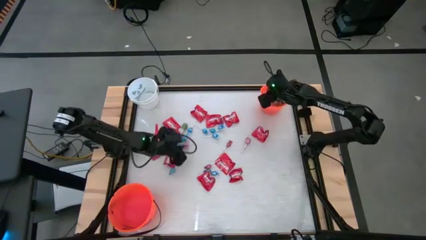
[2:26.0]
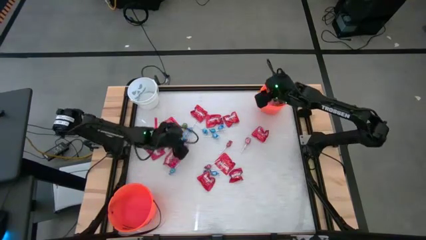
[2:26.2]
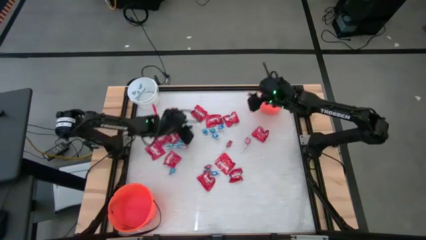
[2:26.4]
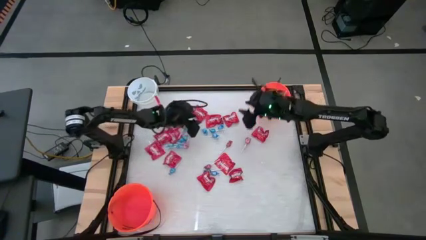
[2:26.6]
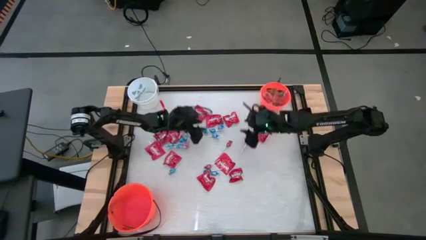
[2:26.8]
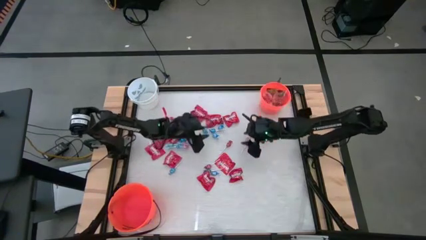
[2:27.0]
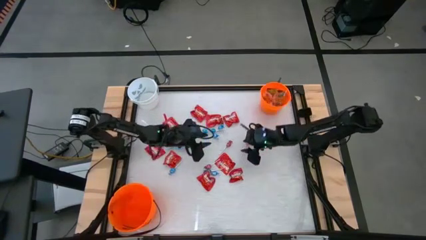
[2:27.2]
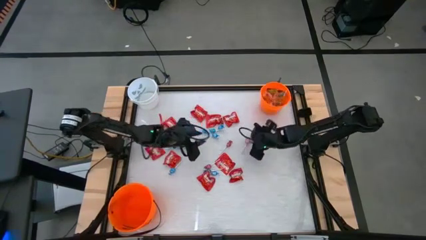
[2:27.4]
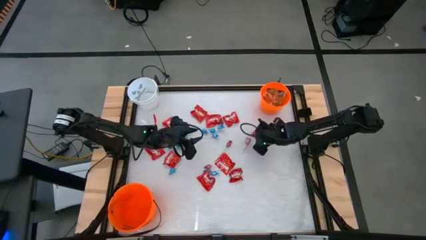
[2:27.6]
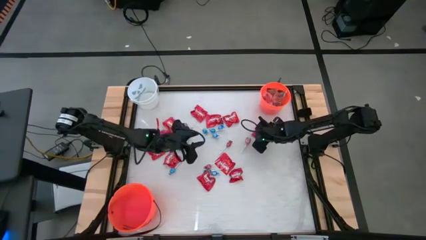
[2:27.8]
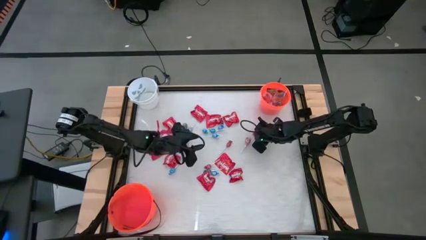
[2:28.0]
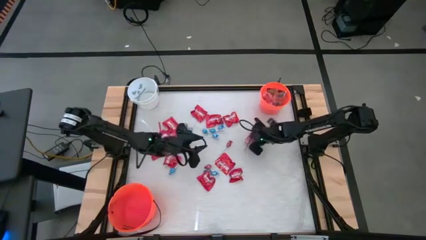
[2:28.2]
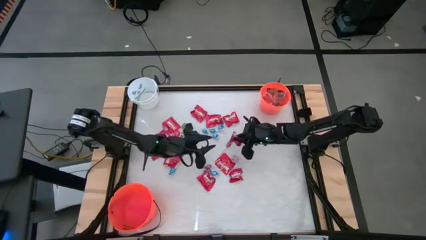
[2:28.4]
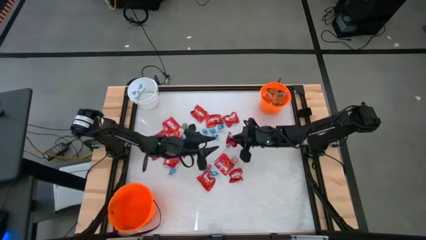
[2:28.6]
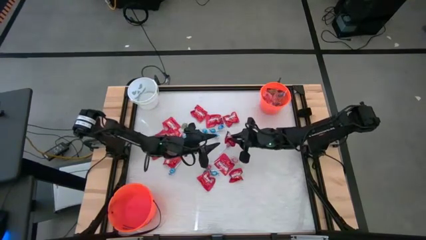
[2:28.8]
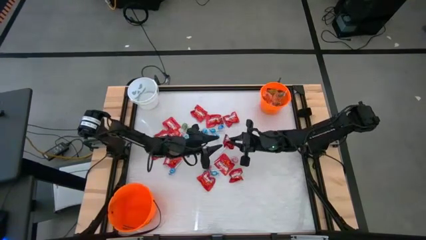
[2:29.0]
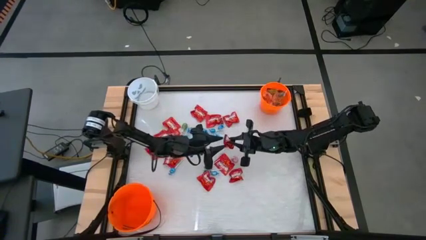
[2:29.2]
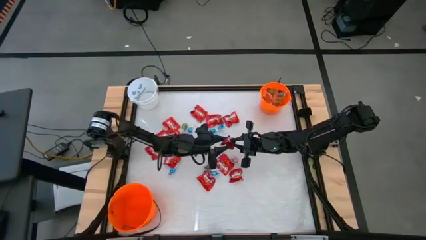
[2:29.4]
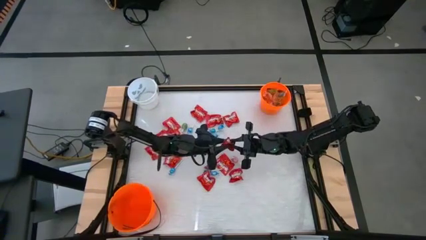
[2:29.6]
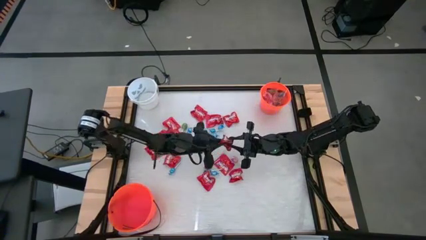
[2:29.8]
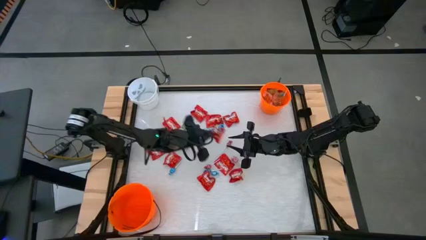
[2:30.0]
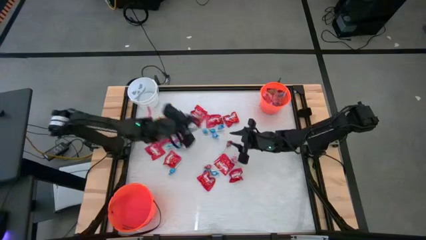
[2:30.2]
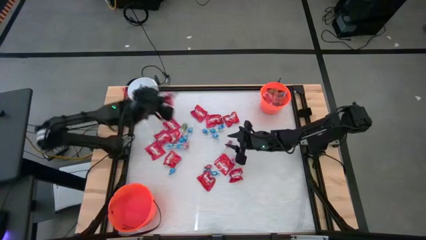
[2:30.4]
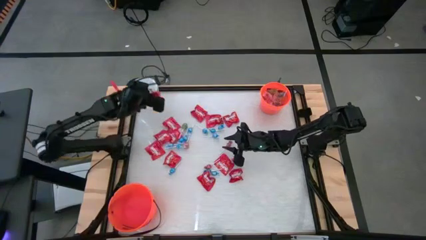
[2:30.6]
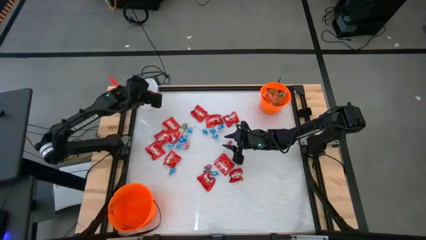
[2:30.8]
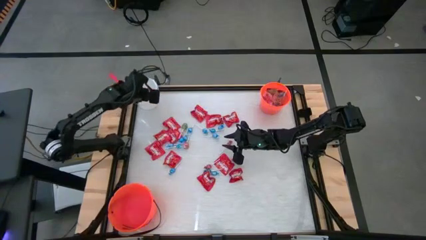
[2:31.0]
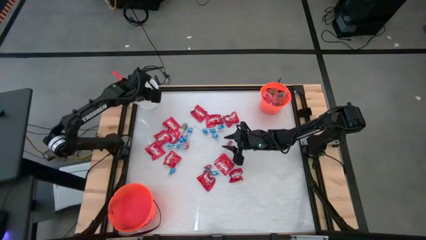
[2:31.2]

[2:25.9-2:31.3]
Task: Sort candy by brand, put in halloween buckets
Put the red candy pack into the white bucket

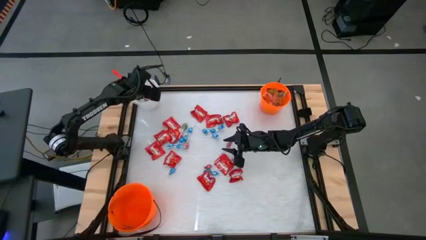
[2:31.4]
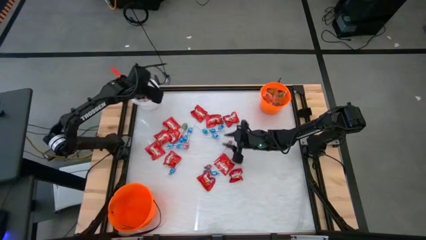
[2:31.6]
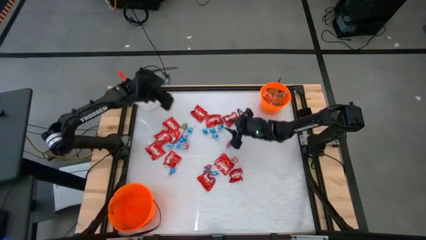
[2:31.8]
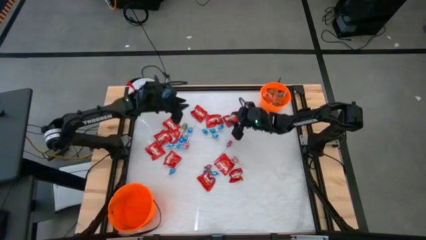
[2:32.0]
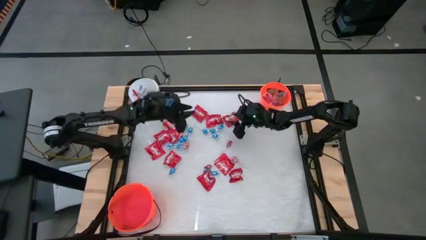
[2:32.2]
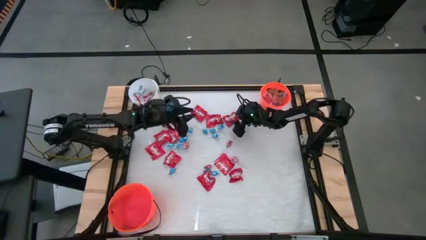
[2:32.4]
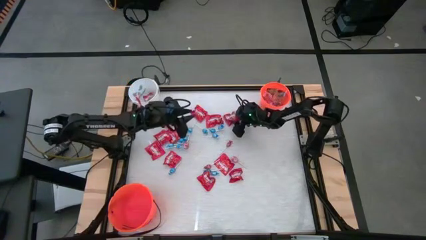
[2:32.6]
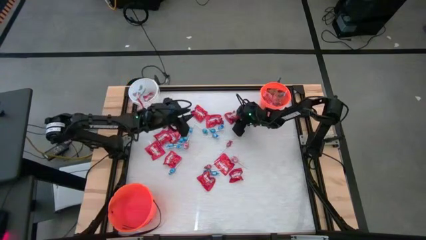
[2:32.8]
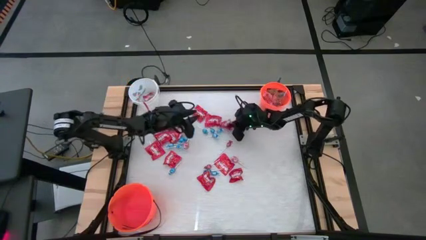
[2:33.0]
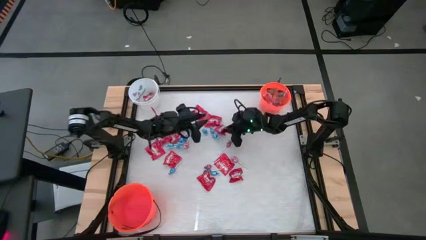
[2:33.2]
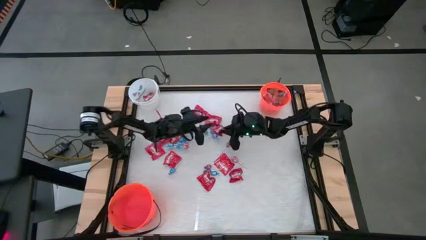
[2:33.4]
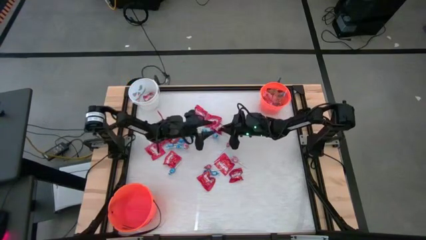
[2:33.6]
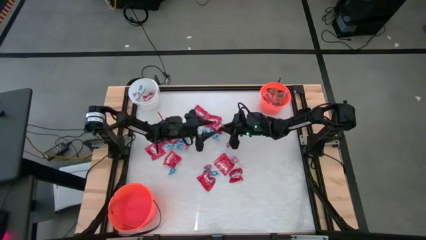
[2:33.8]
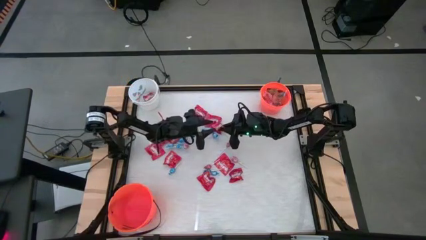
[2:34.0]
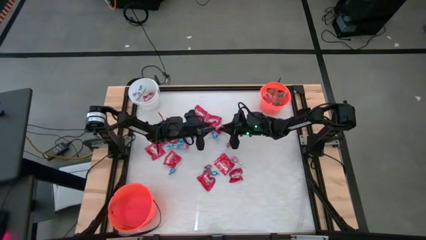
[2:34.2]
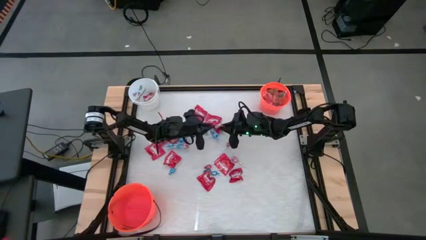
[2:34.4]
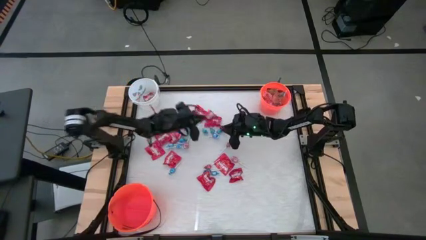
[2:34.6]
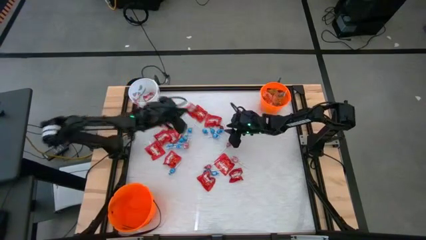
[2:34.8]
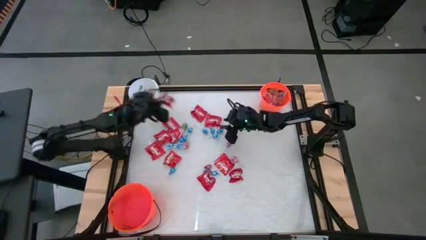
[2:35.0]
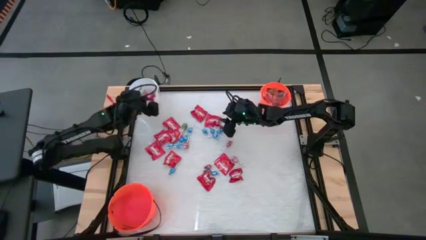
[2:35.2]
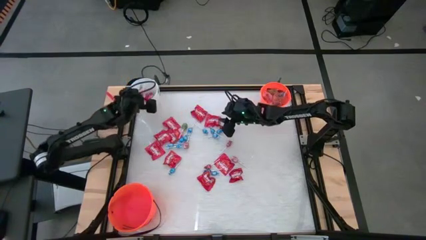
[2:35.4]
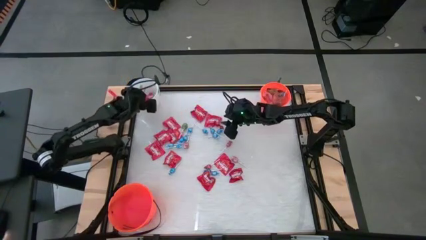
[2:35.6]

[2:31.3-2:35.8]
Put the red candy pack into the white bucket

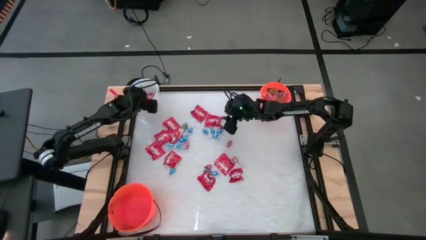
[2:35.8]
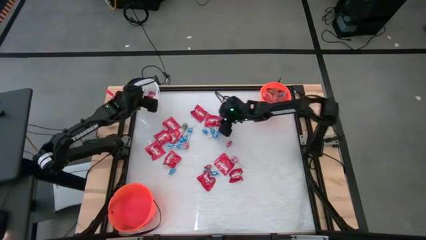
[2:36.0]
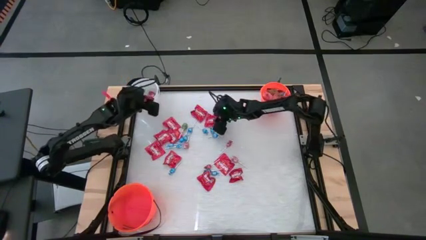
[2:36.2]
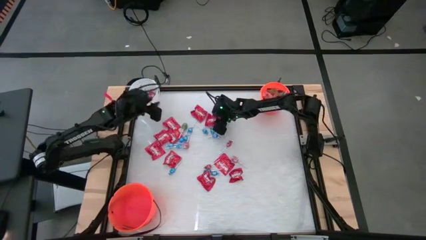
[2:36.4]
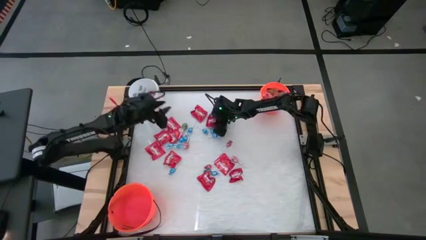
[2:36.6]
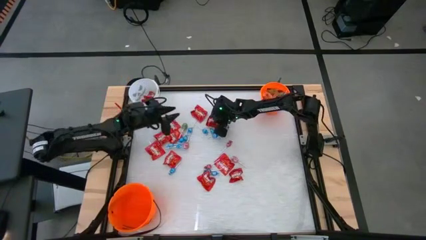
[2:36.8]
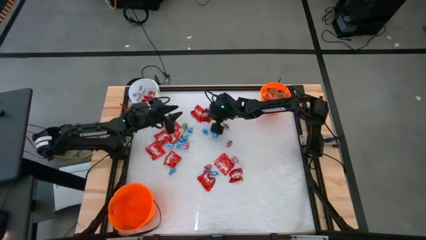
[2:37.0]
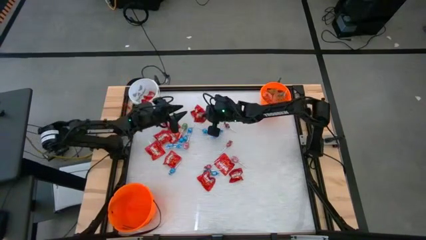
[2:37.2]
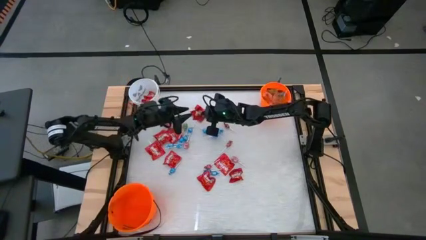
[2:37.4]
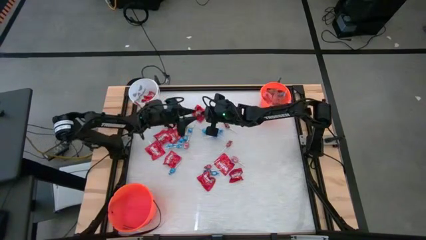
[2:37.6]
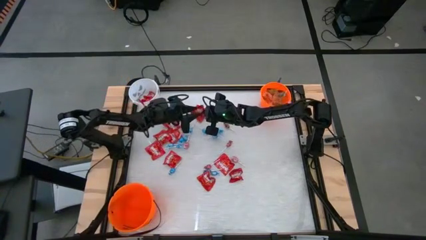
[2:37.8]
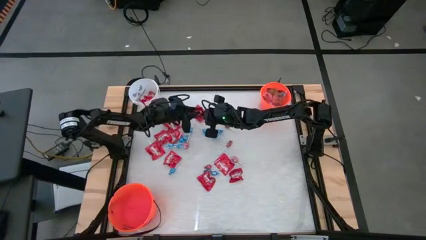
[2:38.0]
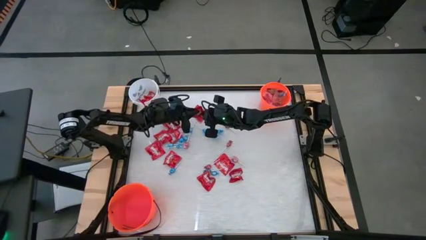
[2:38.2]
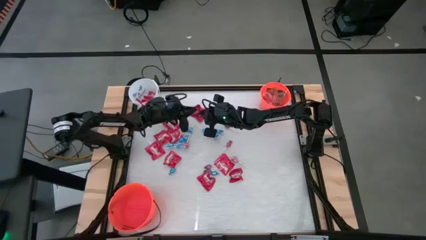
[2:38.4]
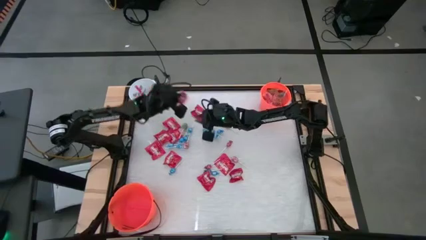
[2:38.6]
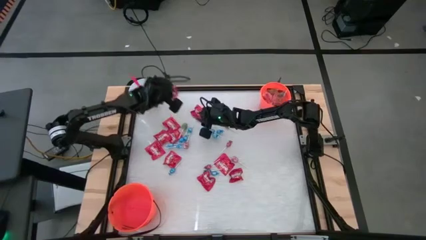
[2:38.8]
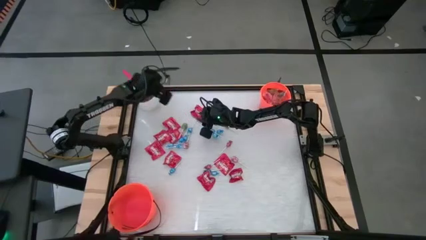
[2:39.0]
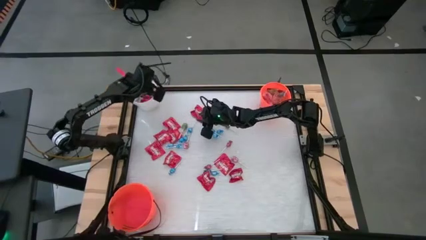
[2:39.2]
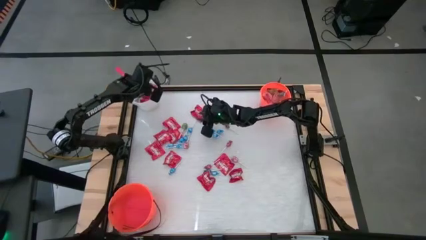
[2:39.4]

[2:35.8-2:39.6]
Put the red candy pack into the white bucket

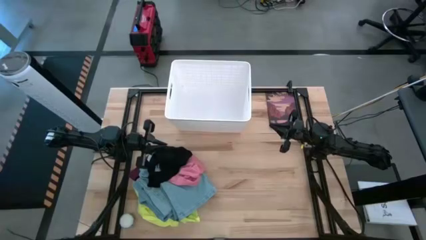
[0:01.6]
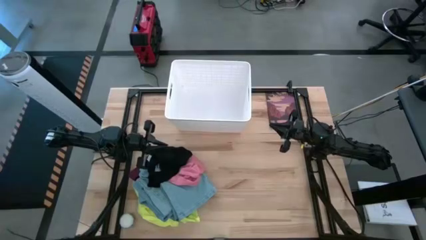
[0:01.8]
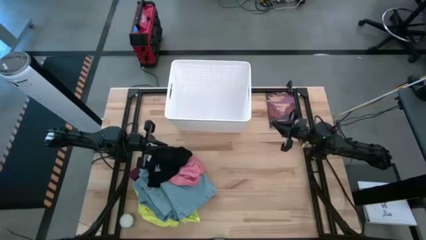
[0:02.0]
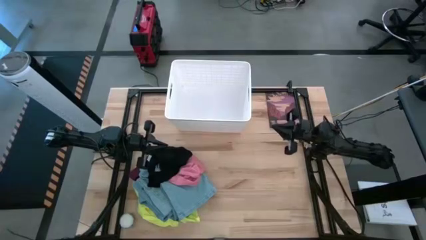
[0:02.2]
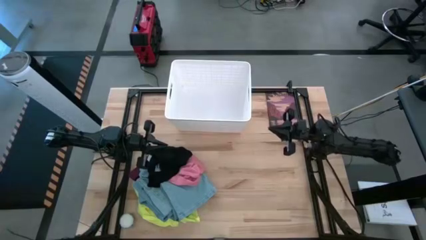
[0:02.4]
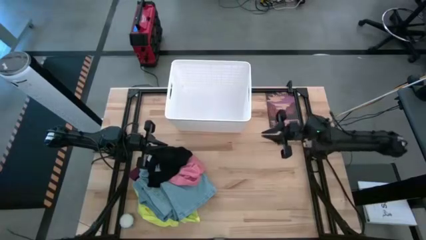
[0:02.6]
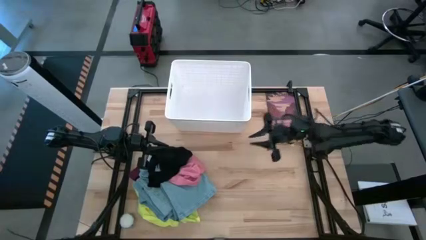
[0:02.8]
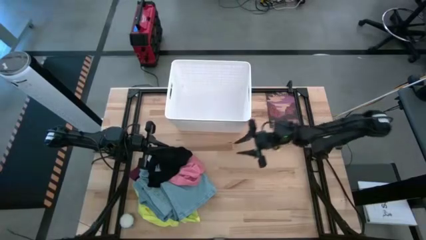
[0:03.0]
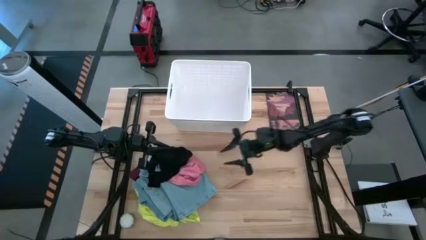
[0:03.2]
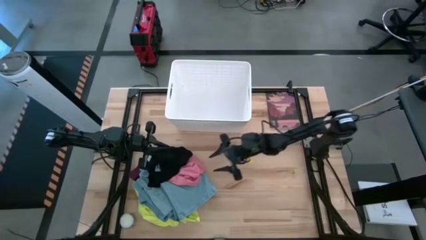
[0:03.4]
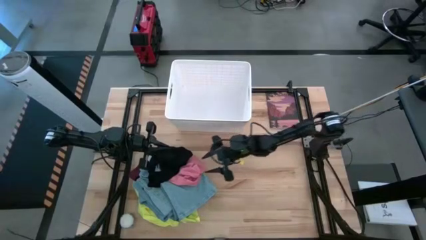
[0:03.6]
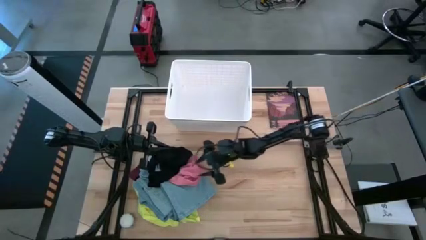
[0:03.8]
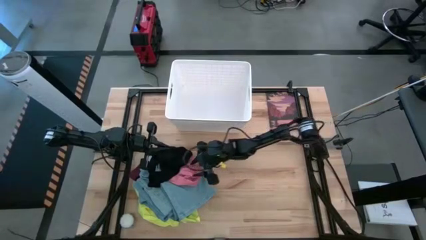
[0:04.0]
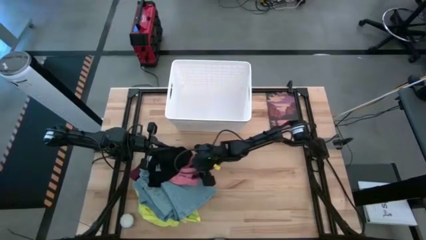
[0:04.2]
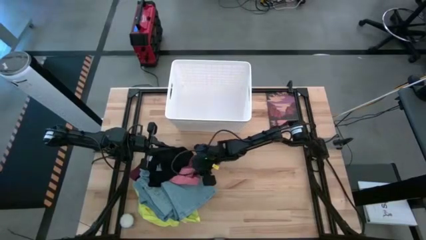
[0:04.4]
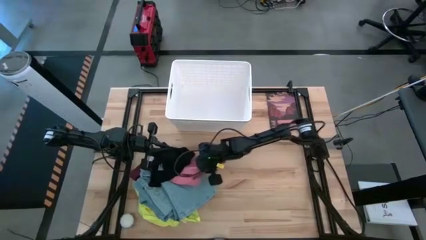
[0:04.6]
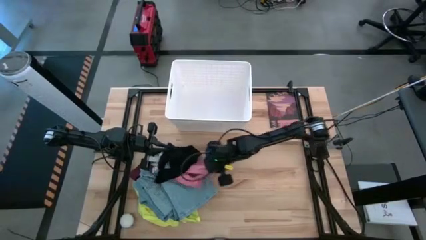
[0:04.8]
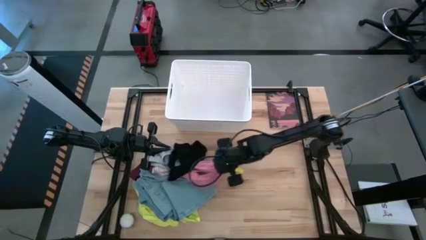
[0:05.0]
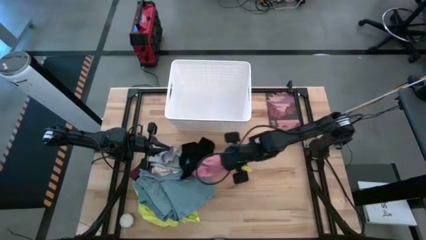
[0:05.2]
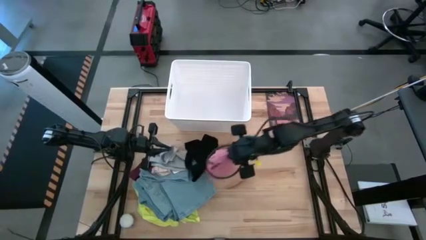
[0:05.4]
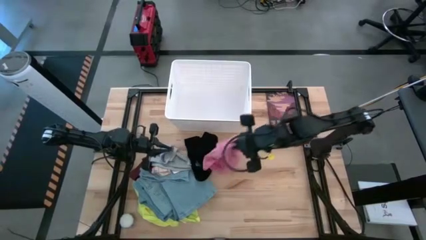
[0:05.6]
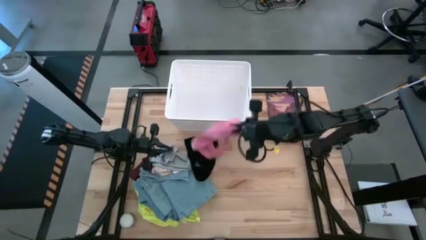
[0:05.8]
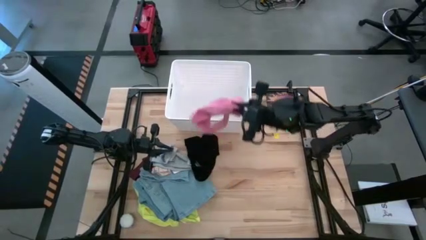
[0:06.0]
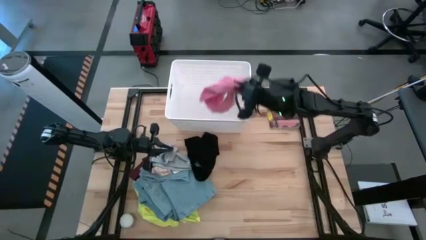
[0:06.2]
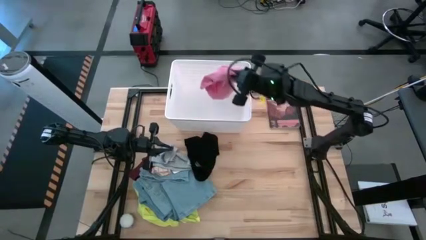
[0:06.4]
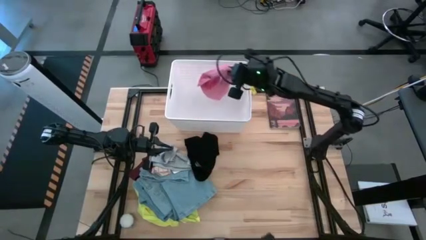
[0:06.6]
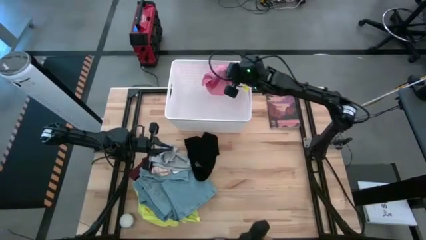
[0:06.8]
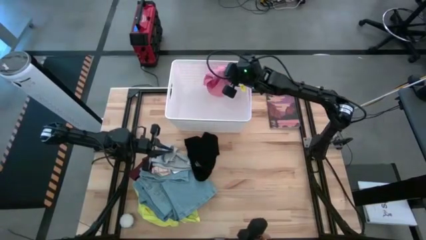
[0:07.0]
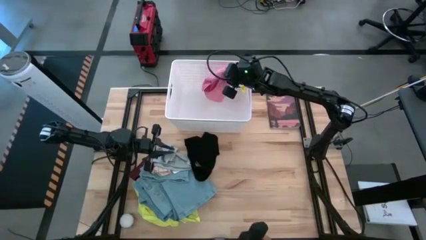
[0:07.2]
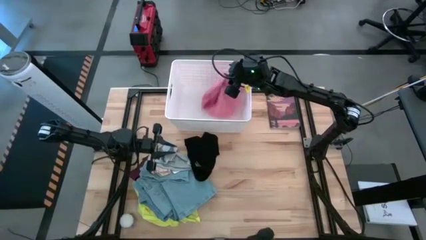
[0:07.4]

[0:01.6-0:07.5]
Task: Sort clothes
Put the pink underwear into the white laundry bin
